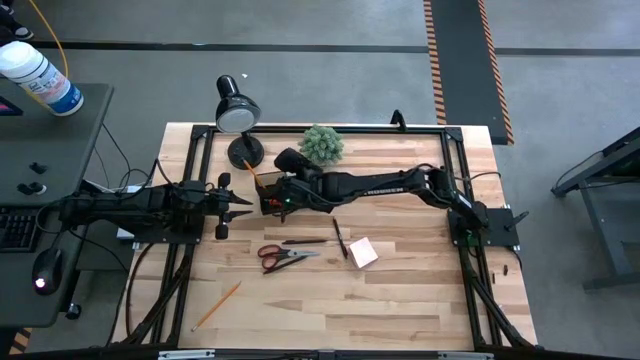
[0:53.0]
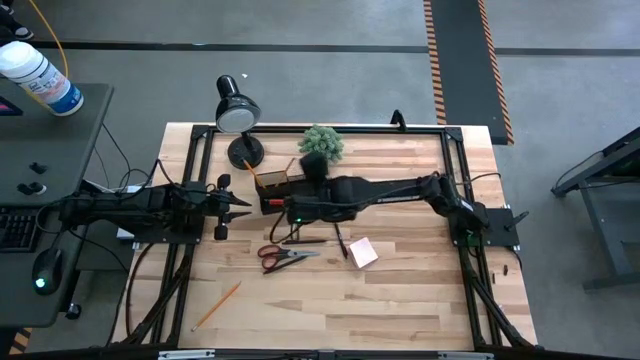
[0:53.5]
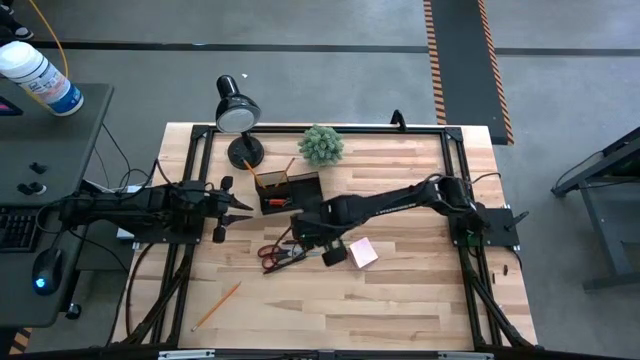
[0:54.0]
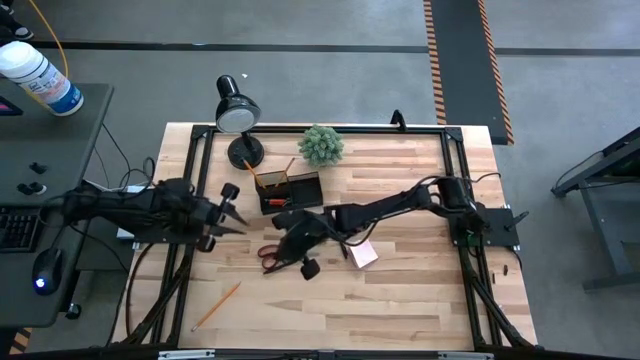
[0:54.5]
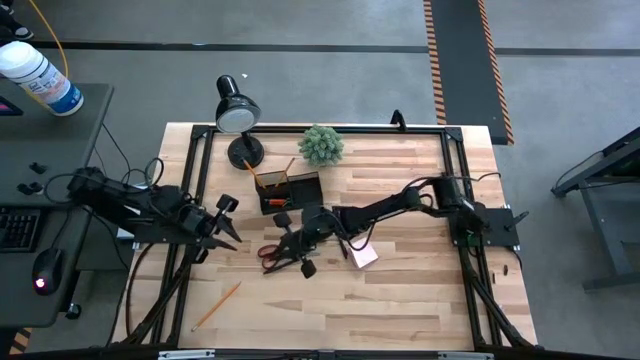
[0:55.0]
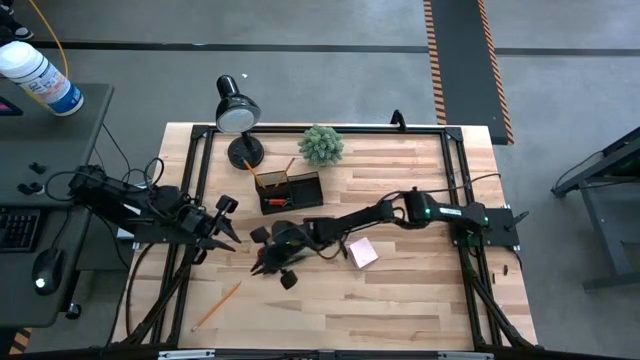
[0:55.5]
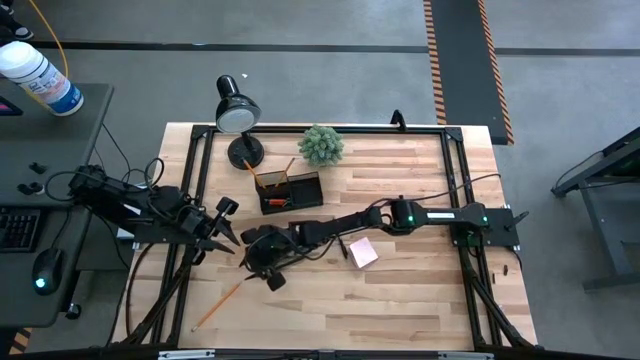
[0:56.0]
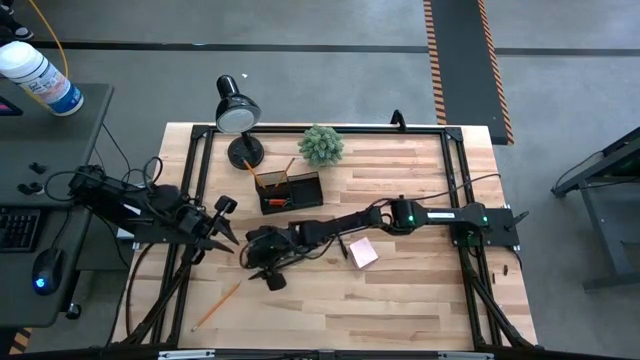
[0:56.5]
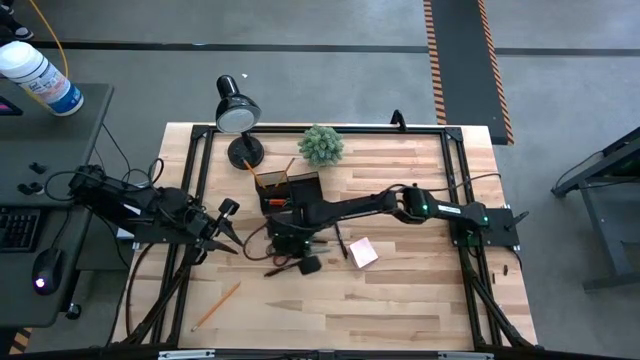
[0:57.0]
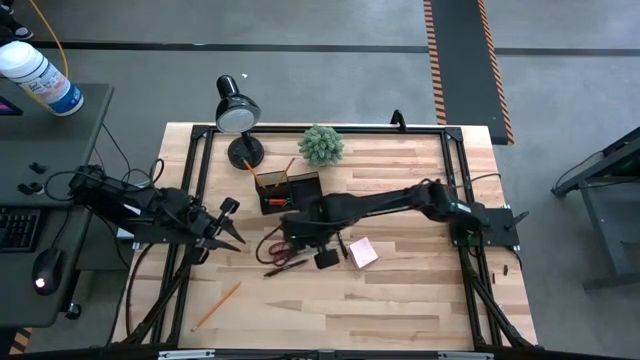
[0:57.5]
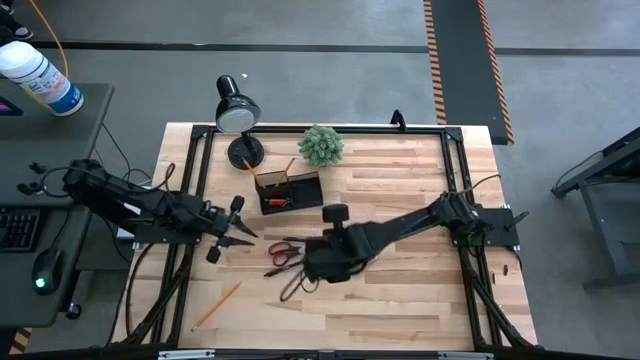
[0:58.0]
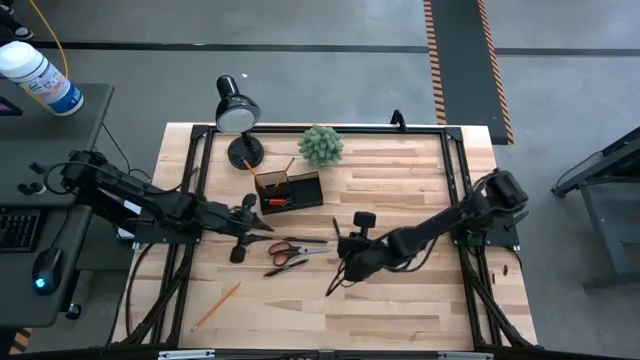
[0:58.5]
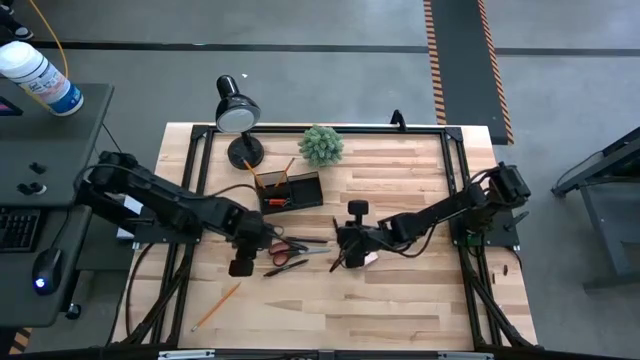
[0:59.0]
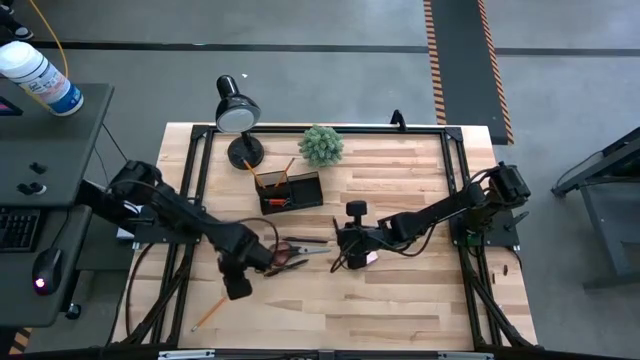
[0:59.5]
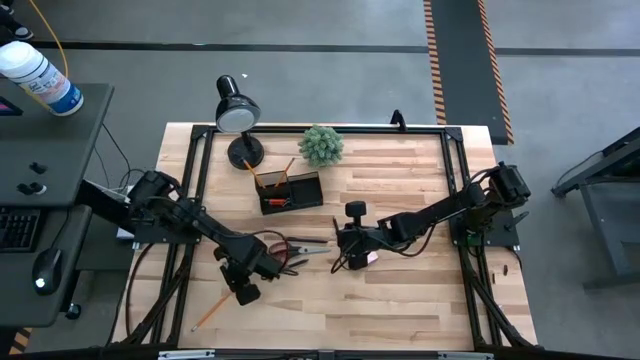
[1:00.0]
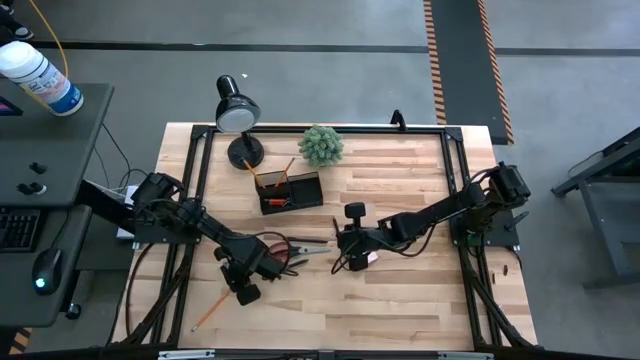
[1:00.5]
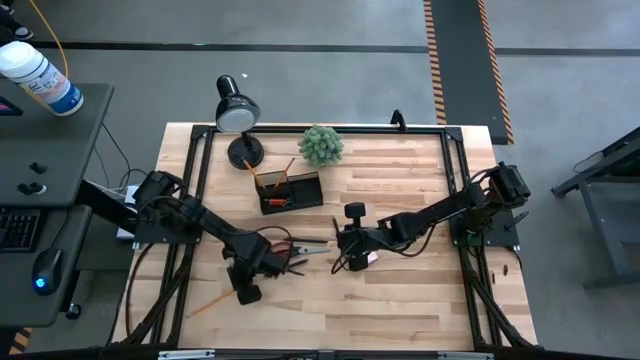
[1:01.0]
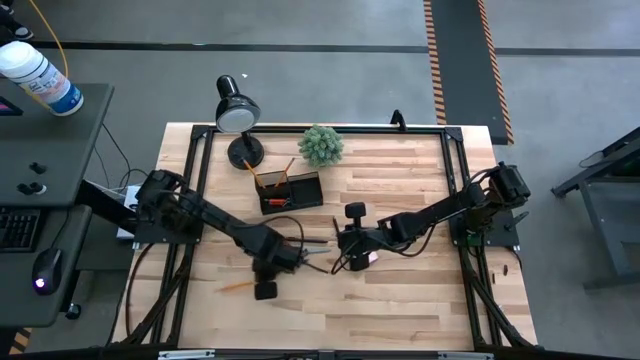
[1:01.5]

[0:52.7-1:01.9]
Task: Pick and place office supplies into organizer
Put the pencil into the desktop organizer

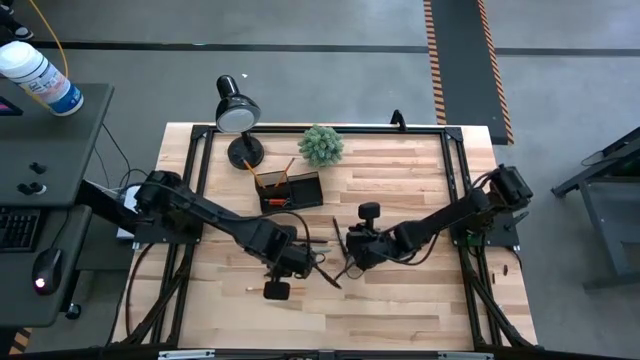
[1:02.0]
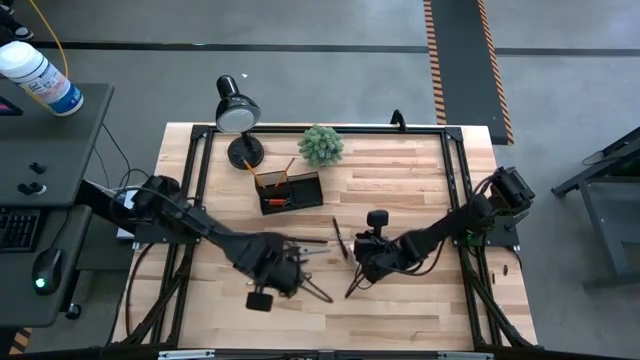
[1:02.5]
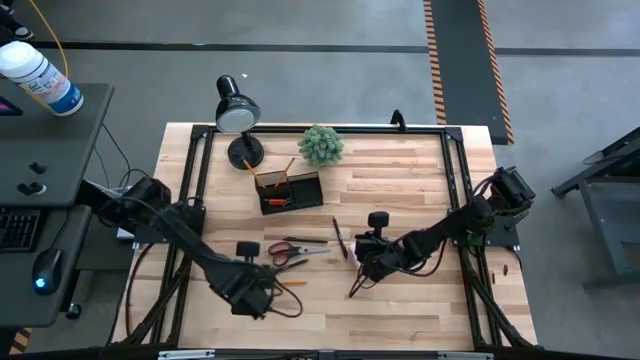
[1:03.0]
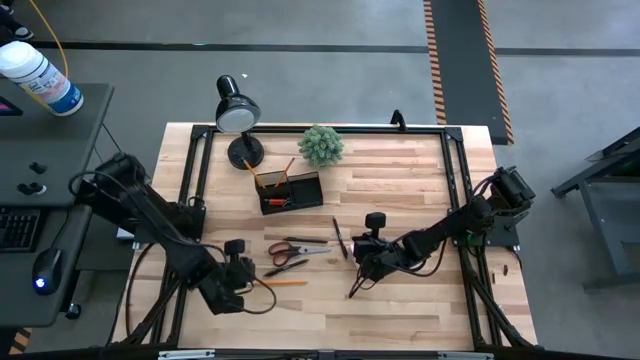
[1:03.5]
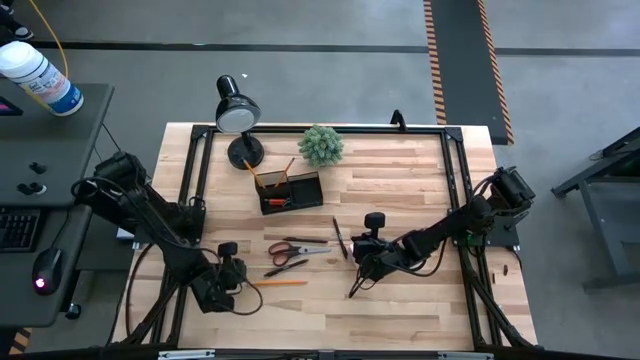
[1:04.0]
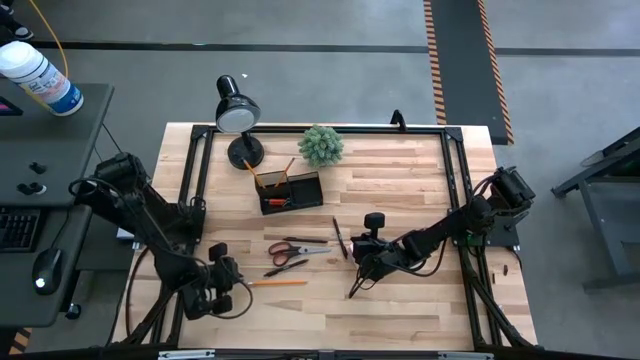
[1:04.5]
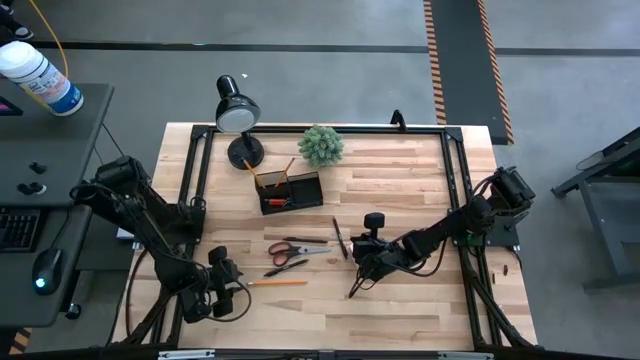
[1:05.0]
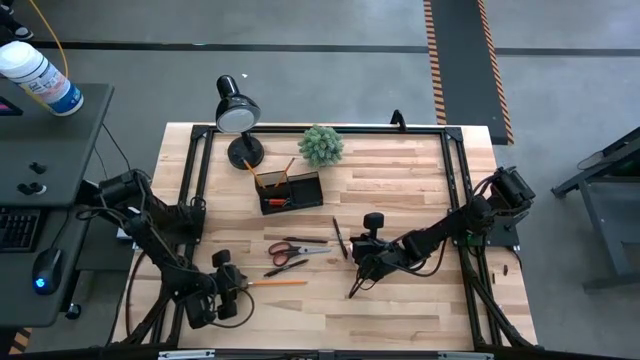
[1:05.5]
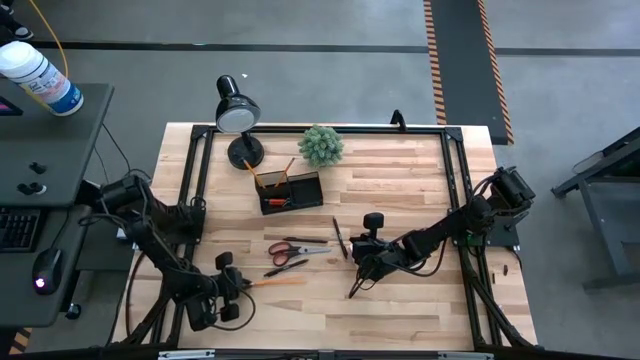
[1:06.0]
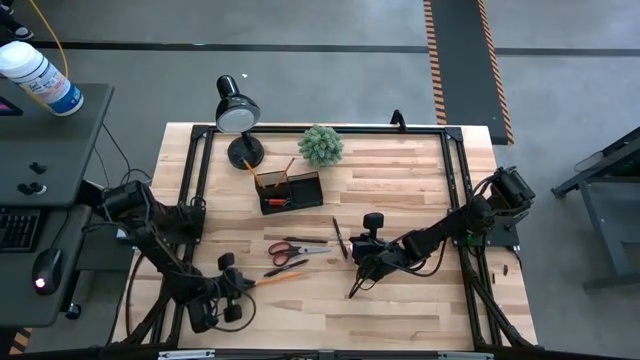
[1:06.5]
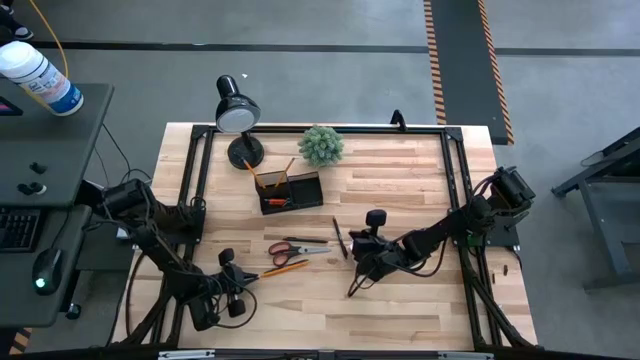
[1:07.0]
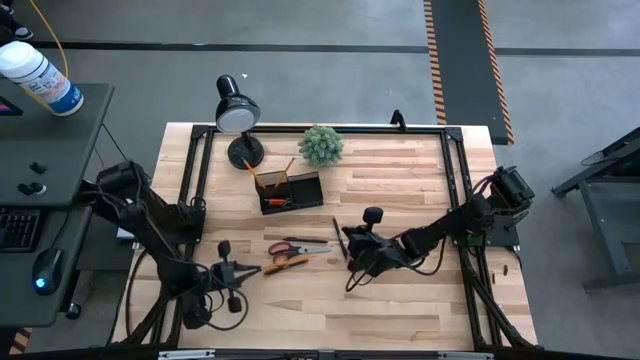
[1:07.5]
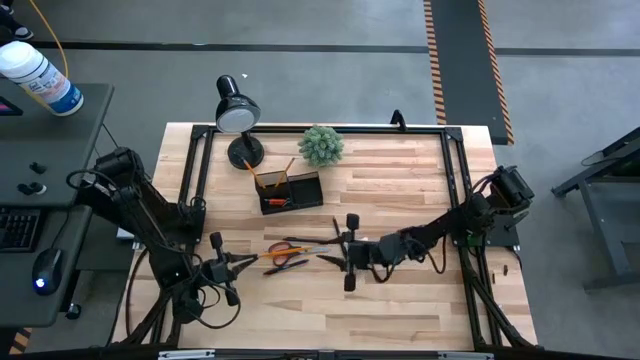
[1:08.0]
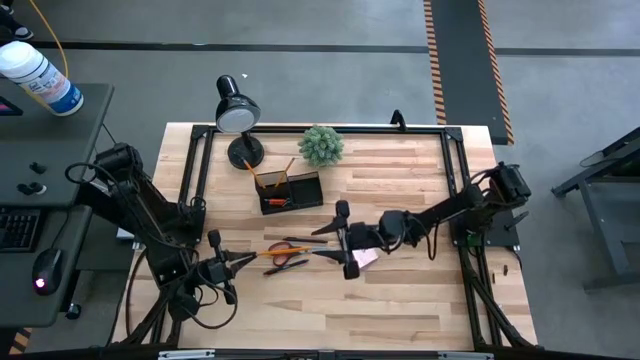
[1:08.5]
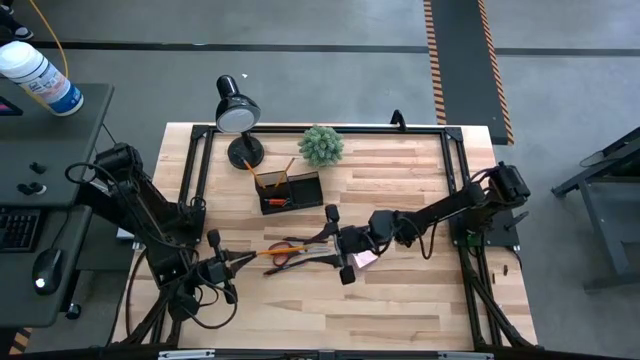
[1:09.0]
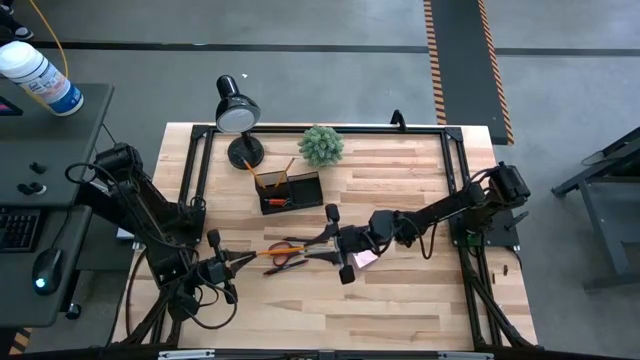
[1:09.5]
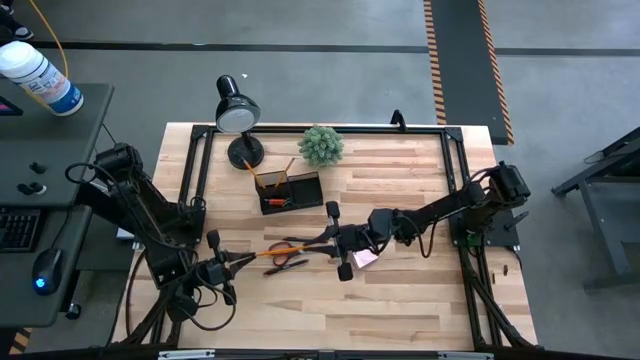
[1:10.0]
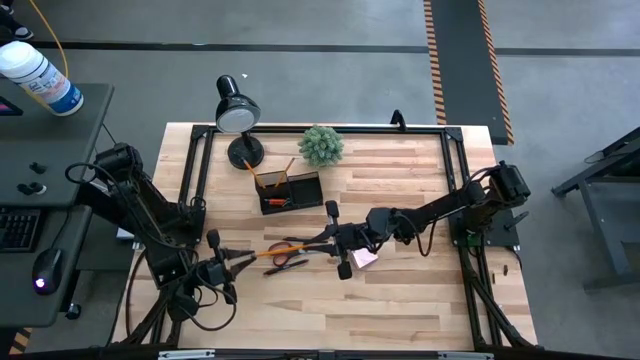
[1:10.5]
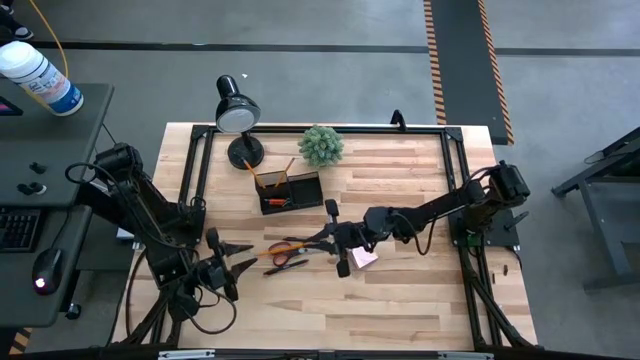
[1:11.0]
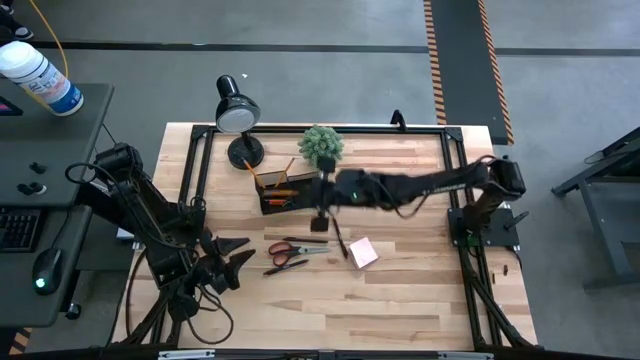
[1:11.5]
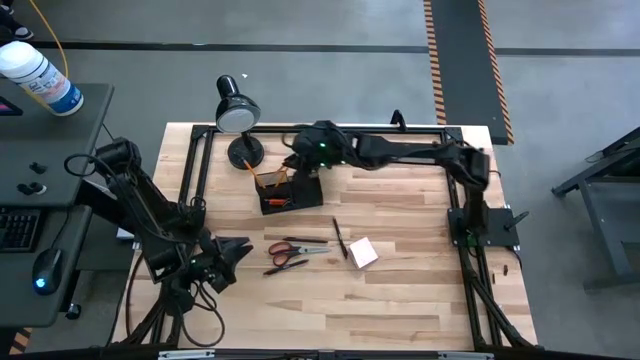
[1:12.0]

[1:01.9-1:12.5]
Put the pencil into the desktop organizer

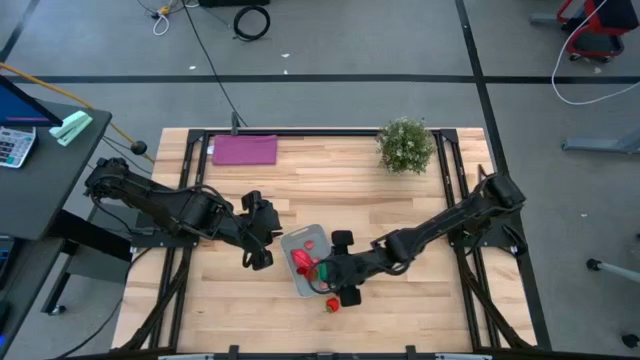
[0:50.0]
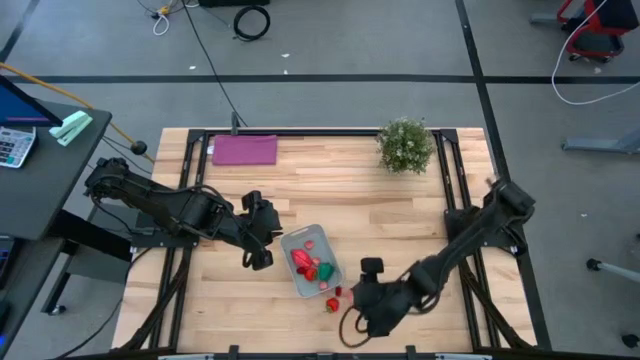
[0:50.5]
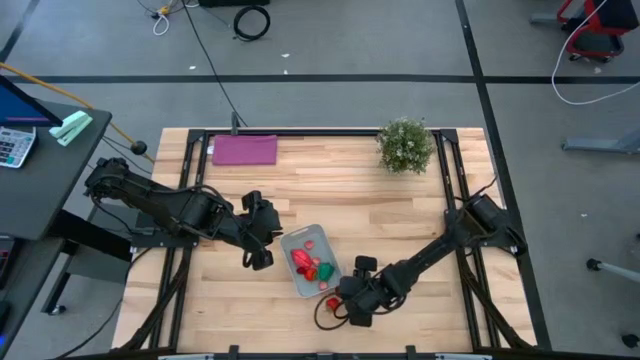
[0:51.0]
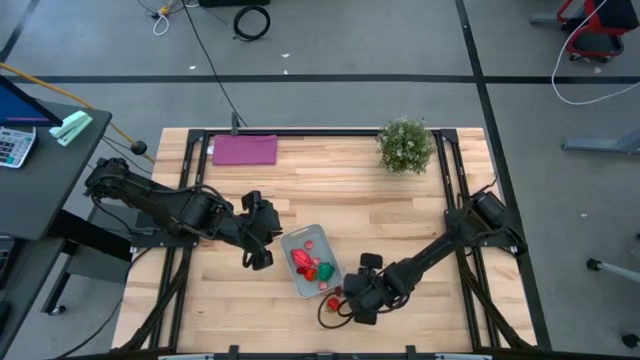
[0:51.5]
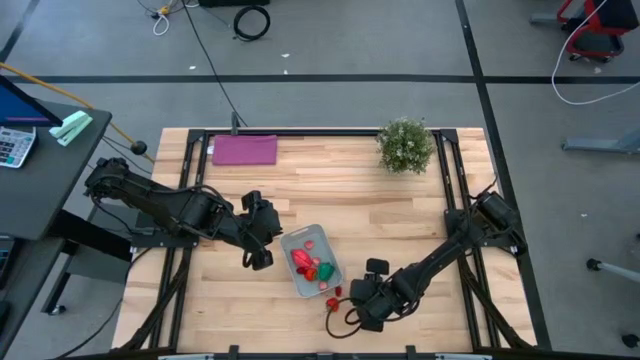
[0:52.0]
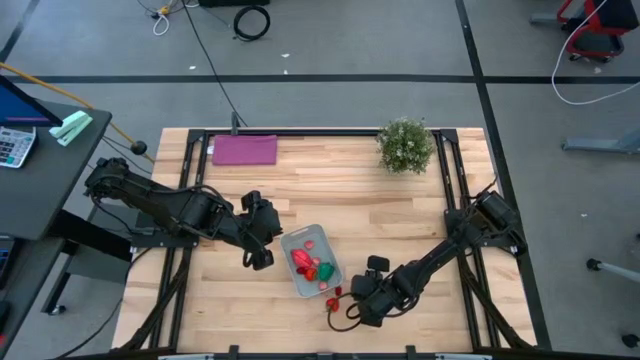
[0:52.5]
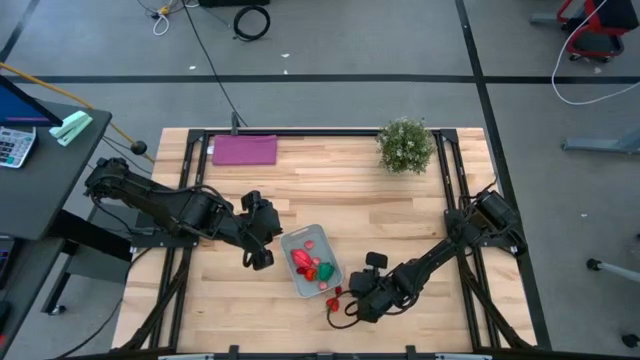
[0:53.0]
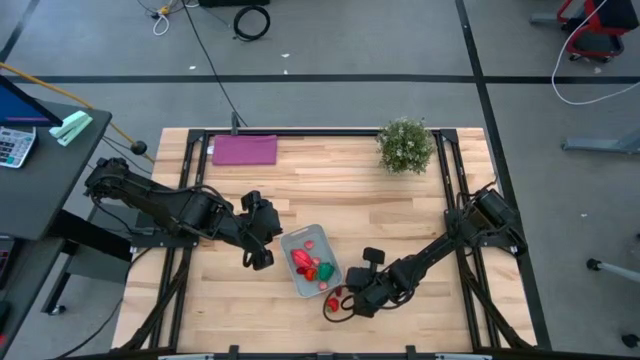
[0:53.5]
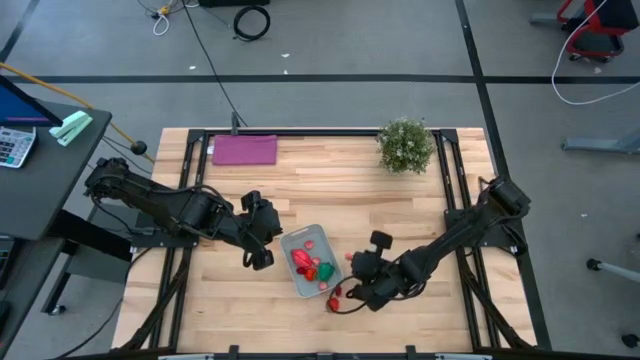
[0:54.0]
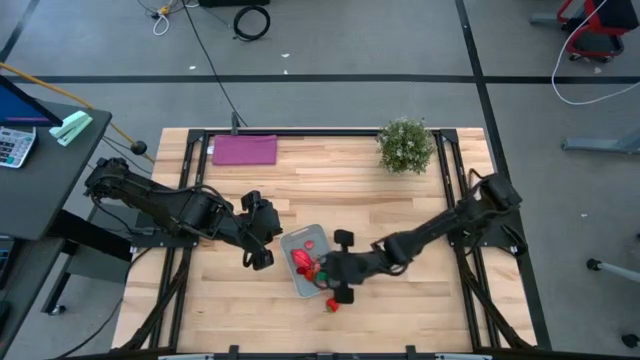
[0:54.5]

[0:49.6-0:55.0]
Task: Pick and placing Produce into tupperware
Put the pink peach into the gray bin
